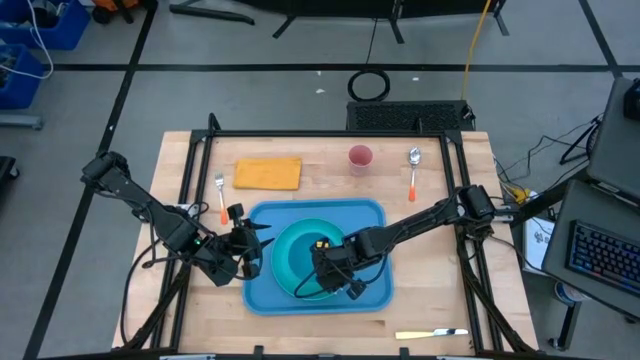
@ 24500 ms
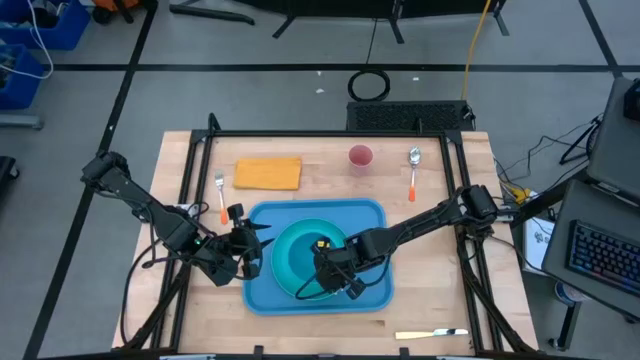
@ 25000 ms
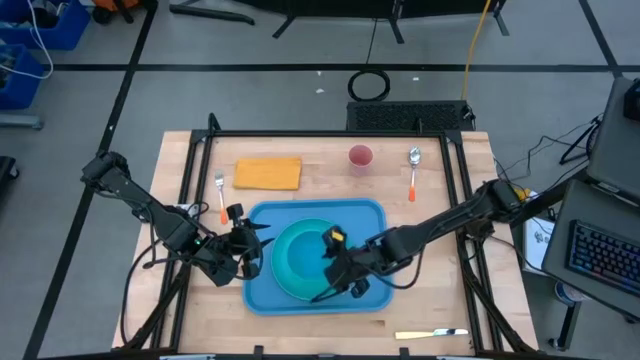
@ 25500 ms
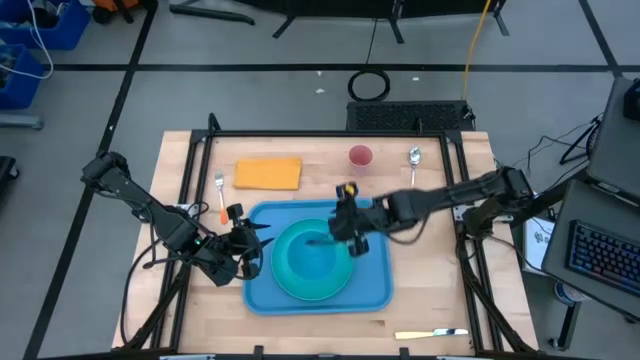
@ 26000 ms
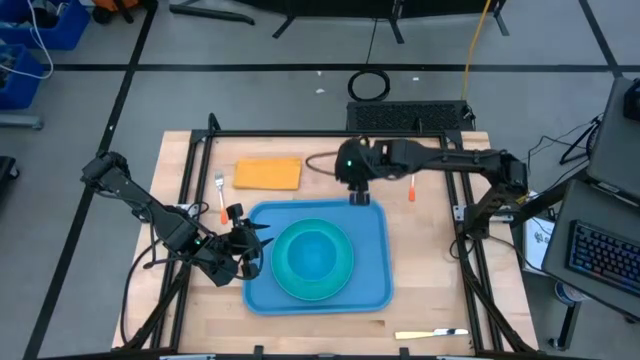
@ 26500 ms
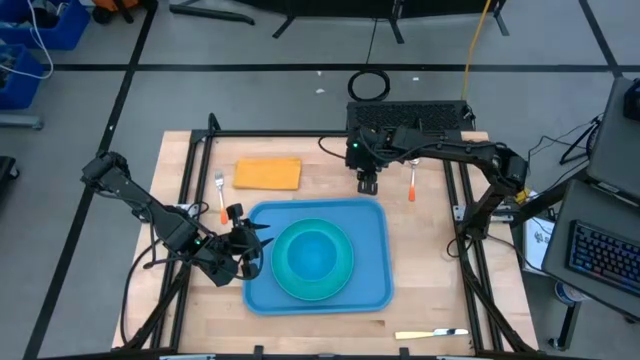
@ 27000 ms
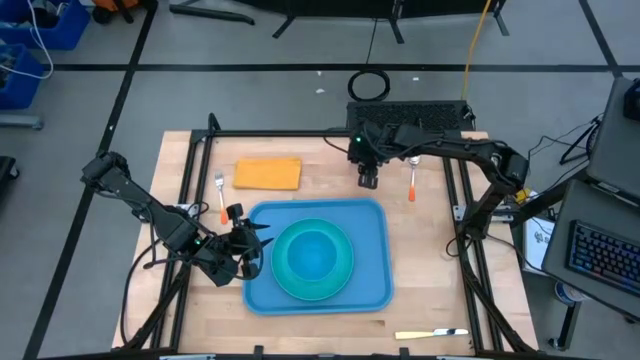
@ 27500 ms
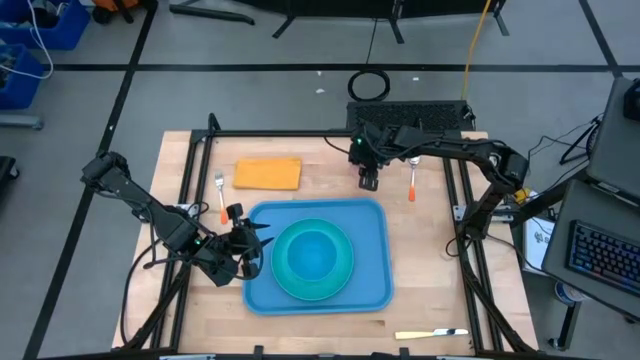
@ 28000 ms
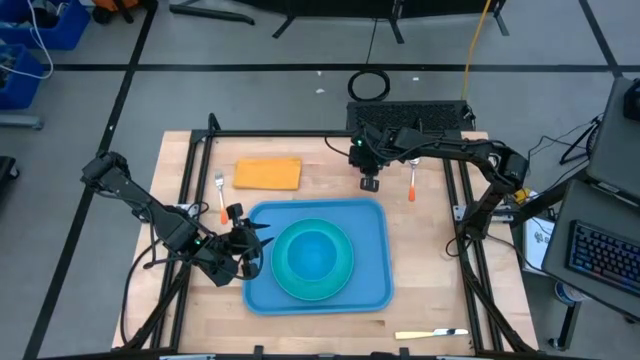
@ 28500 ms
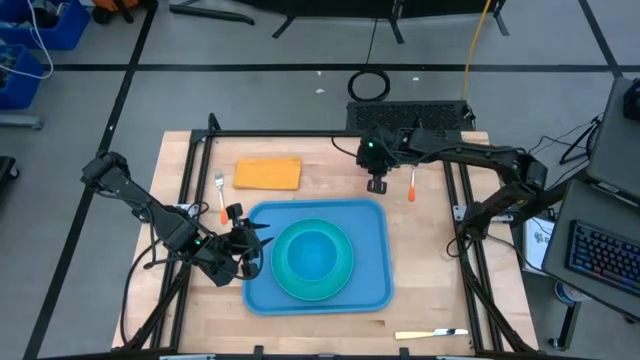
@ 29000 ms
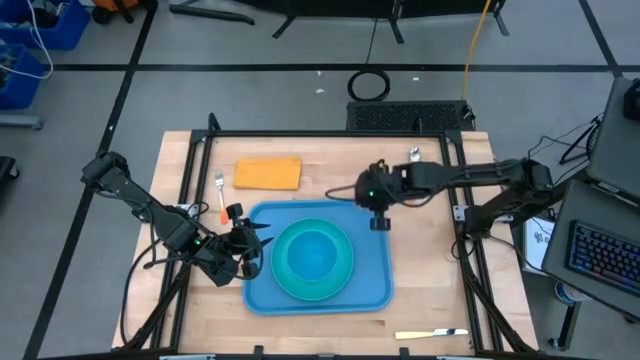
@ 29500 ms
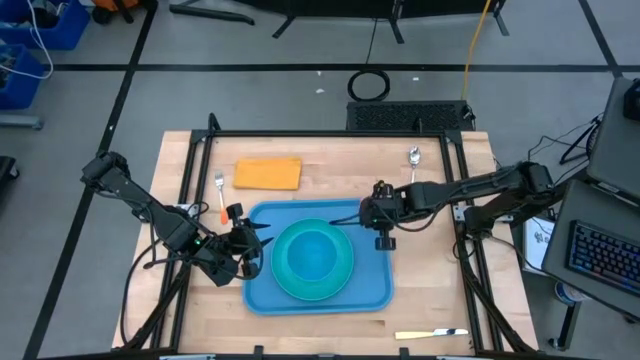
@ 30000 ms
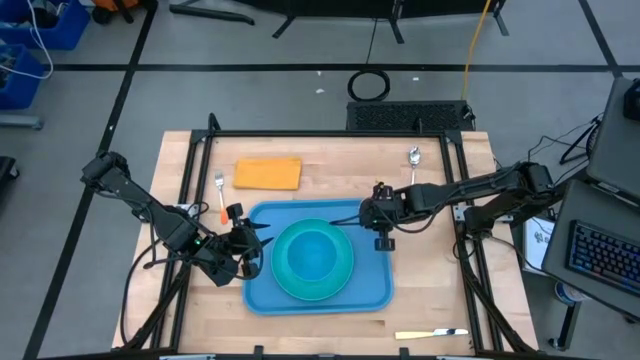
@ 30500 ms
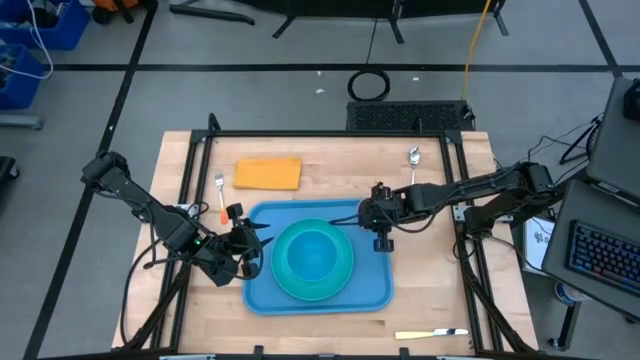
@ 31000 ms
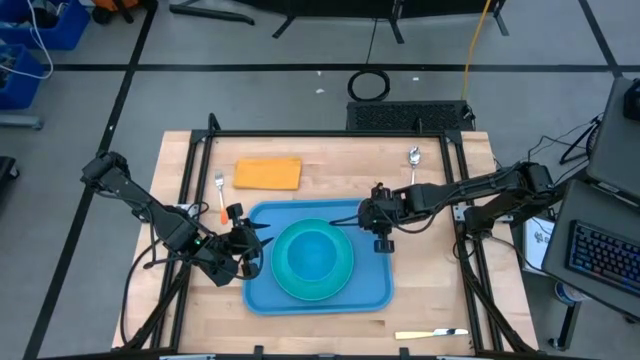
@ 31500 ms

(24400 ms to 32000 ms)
Task: Set up tray
Put the pink cup on top of the blue tray

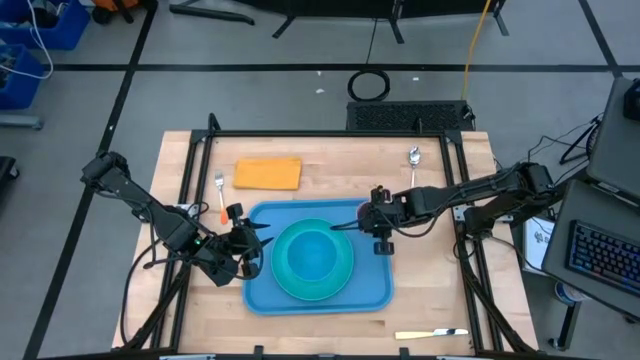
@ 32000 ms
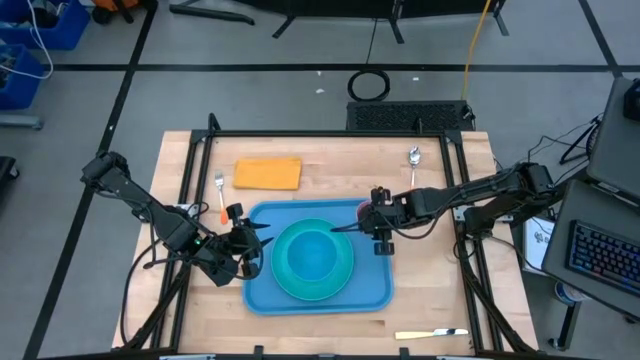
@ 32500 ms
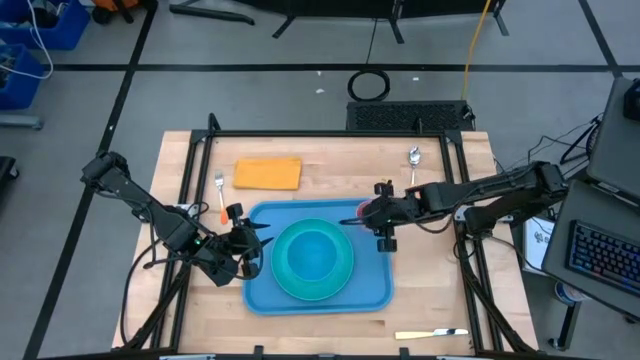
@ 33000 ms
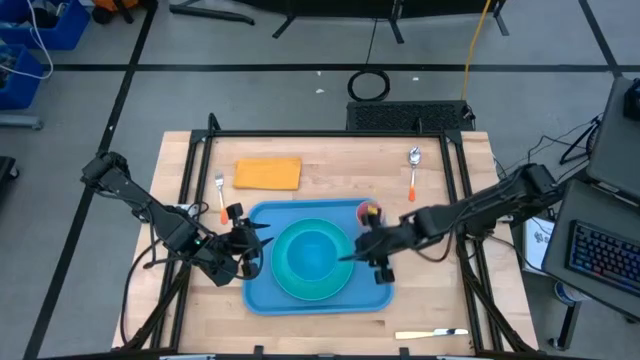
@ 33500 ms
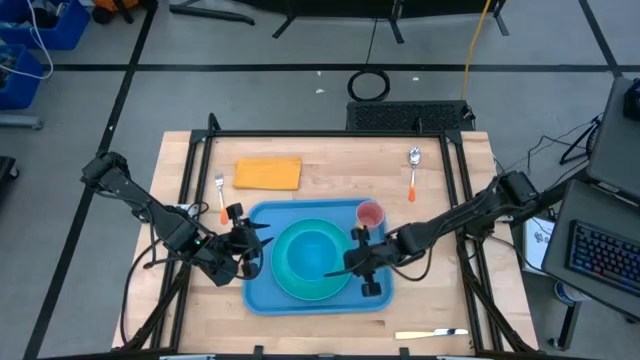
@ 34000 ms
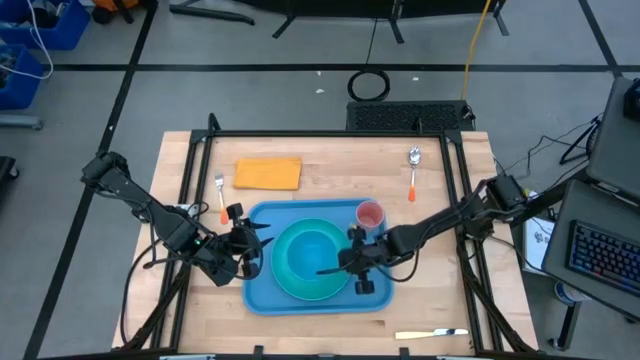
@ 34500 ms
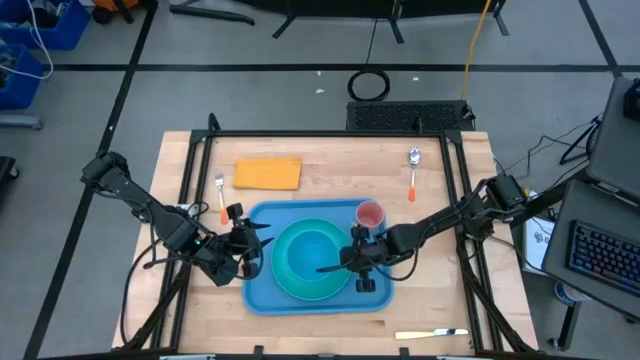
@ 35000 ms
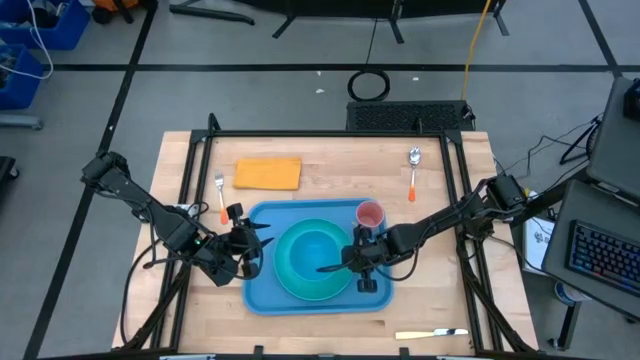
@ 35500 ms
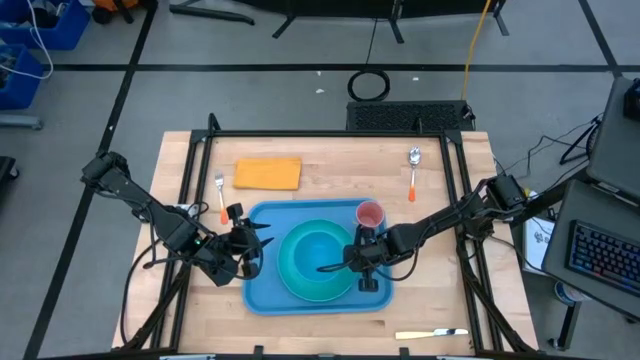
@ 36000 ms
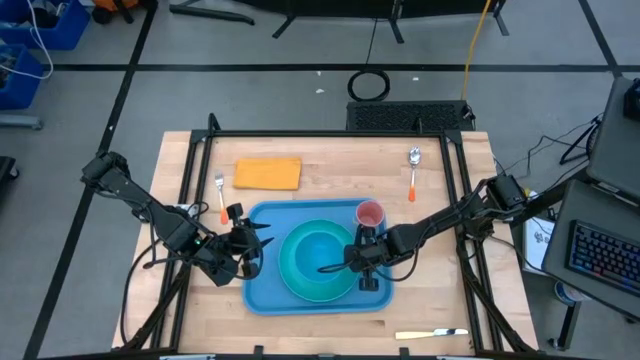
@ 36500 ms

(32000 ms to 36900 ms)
Adjust the light blue plate

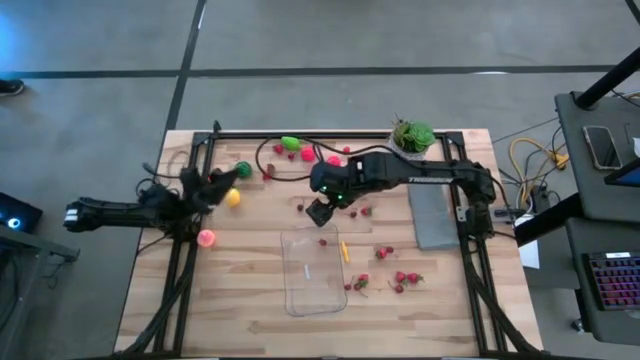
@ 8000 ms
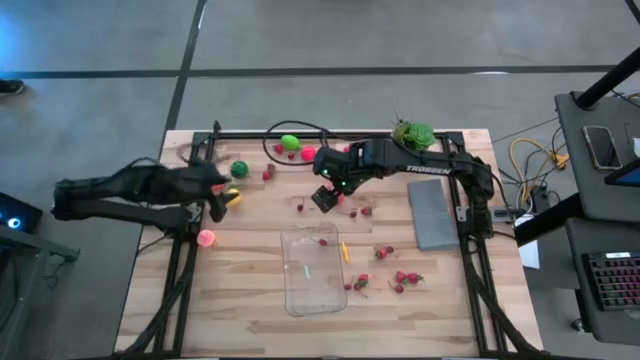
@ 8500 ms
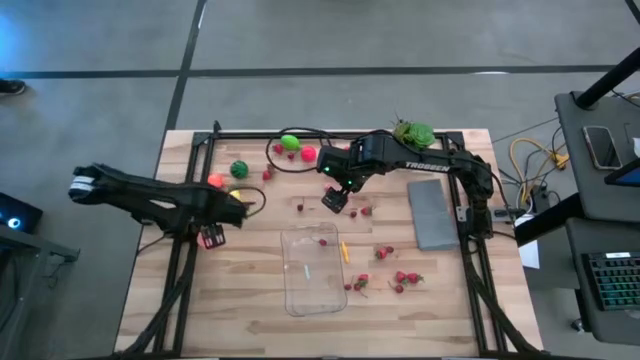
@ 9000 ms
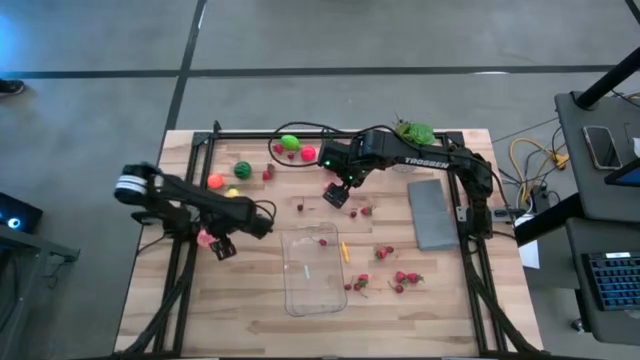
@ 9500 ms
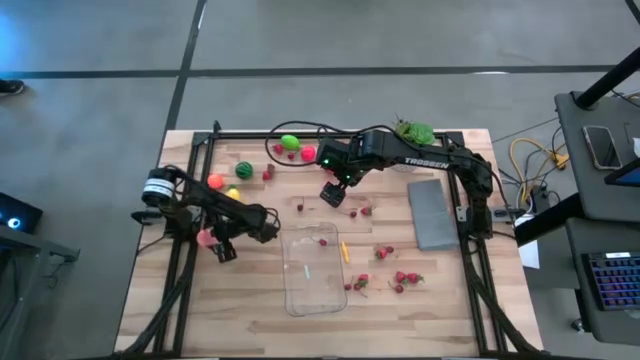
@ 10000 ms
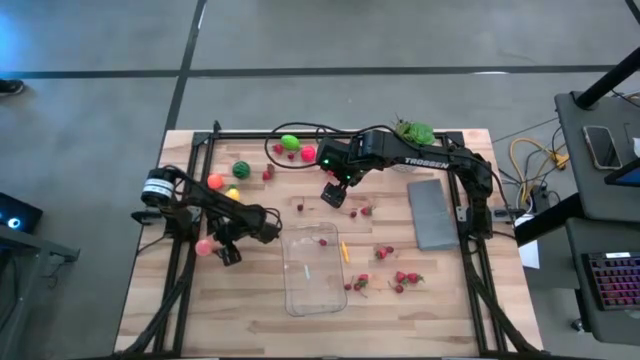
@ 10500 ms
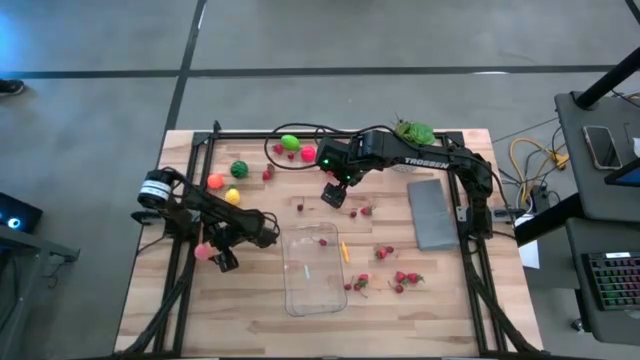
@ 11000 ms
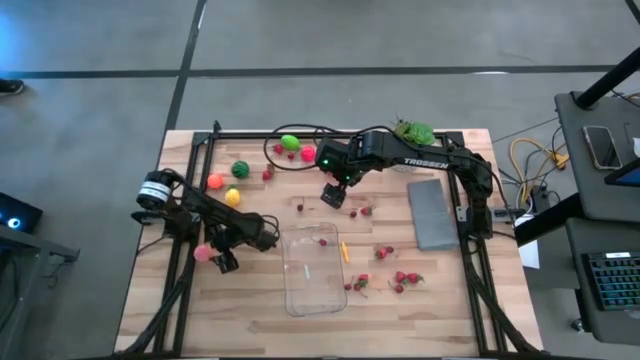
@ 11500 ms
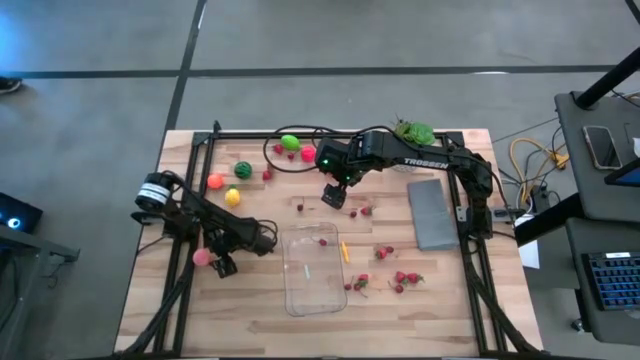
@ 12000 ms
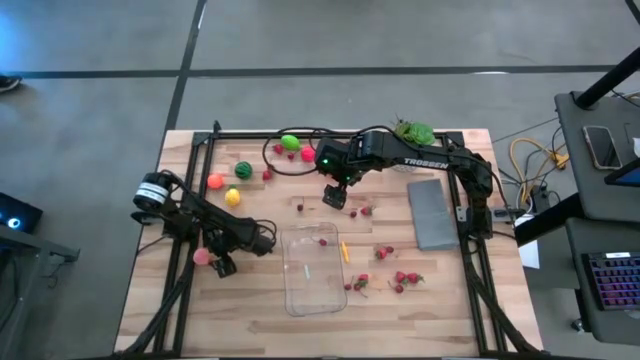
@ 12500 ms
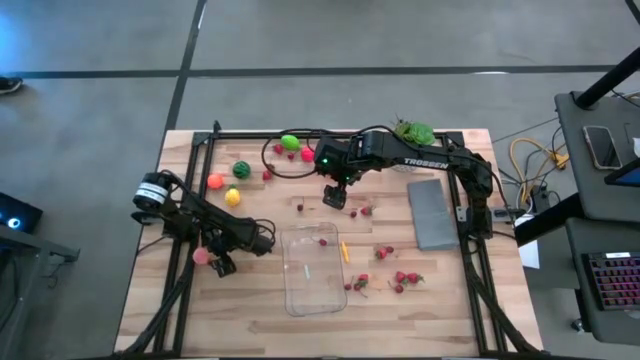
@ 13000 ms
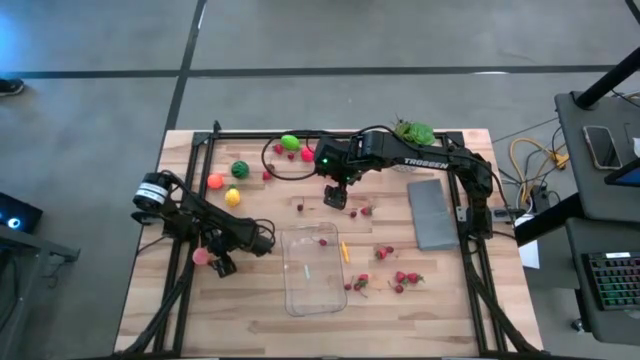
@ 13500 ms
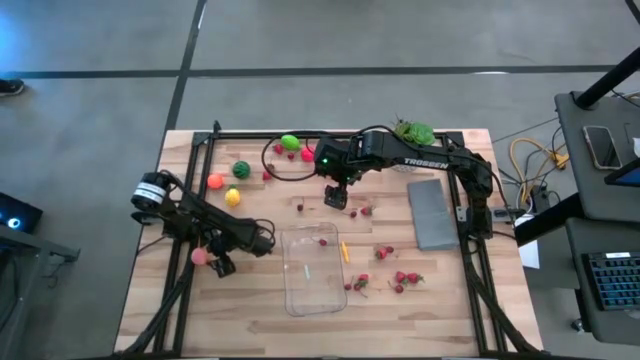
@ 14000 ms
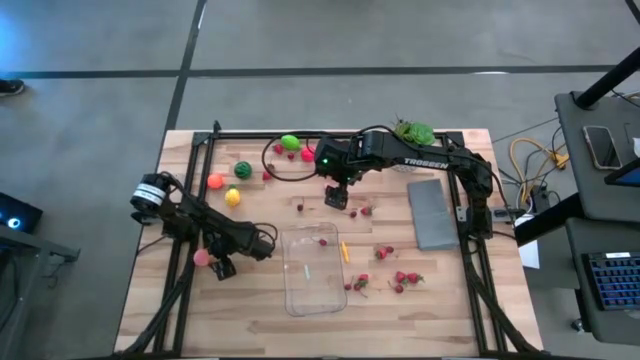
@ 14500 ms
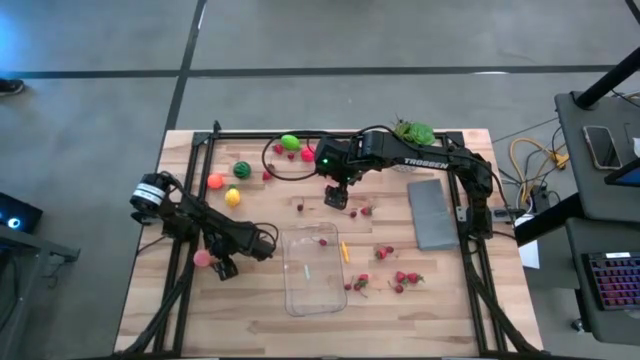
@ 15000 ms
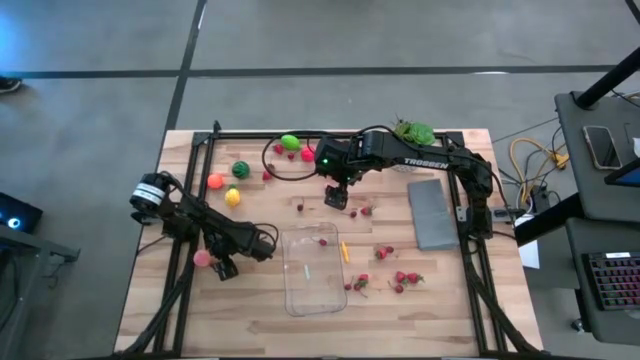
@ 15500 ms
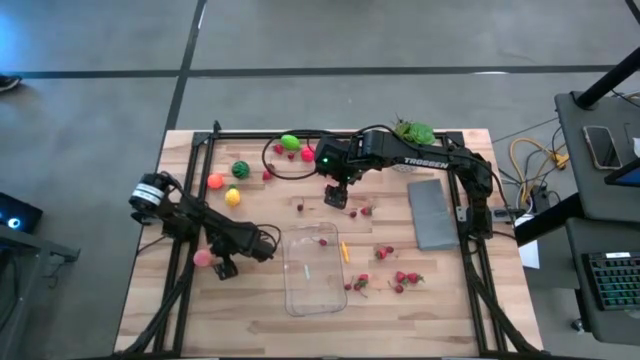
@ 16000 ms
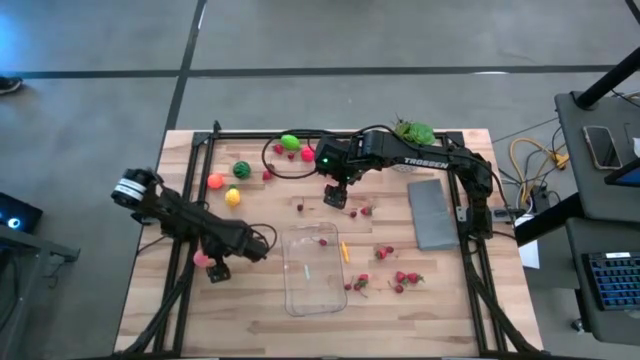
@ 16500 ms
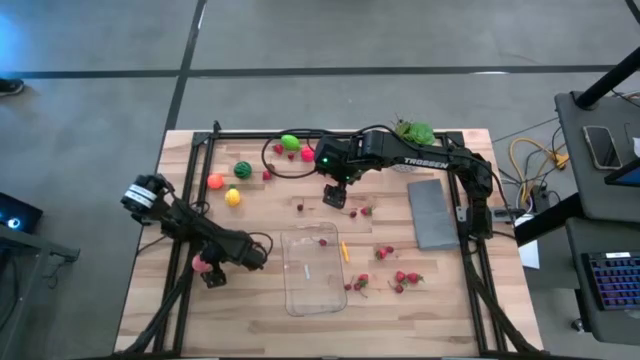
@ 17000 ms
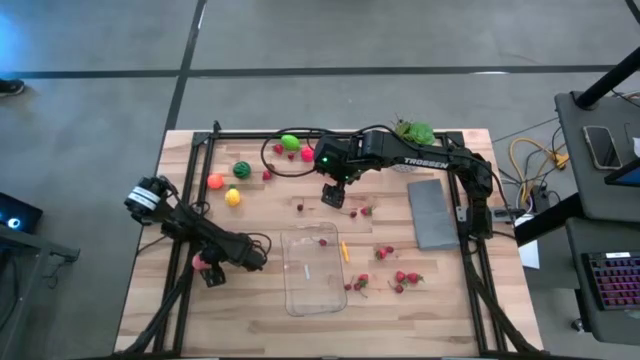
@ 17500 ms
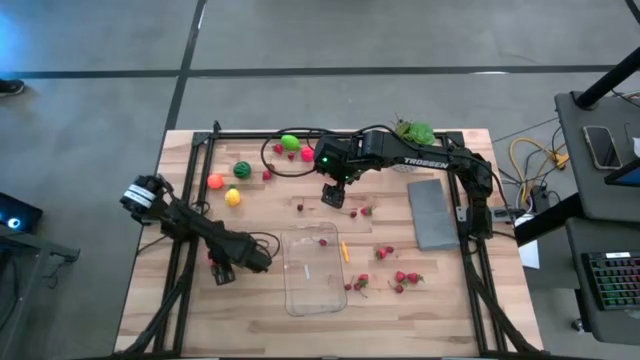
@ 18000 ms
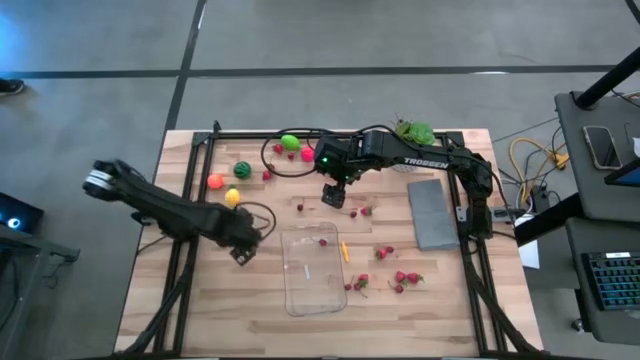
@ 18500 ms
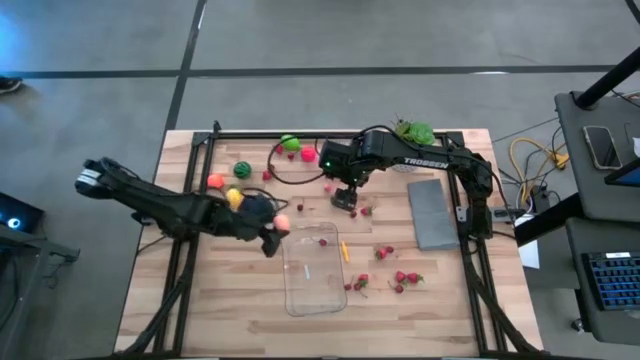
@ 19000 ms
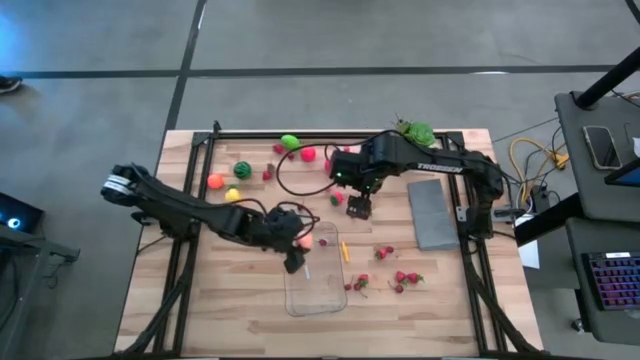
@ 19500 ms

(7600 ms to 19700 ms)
Task: Pick and placing Produce into tupperware
Put the light orange peach into the transparent bin
